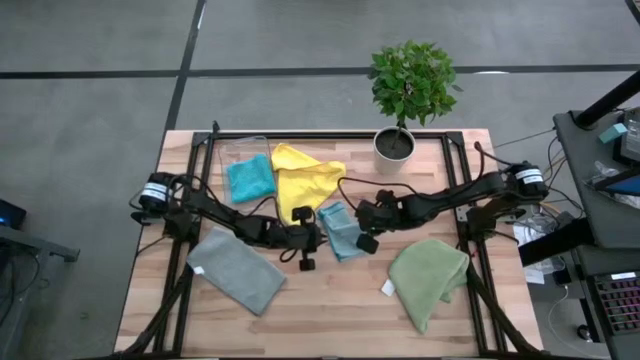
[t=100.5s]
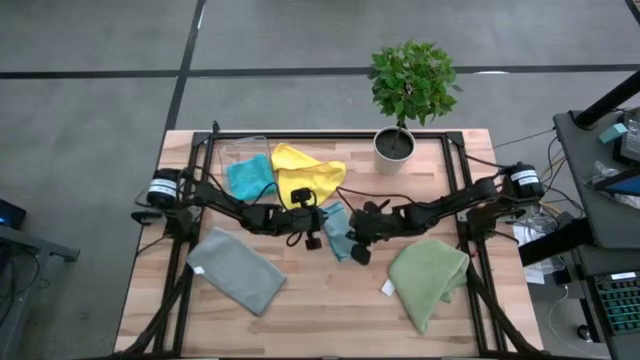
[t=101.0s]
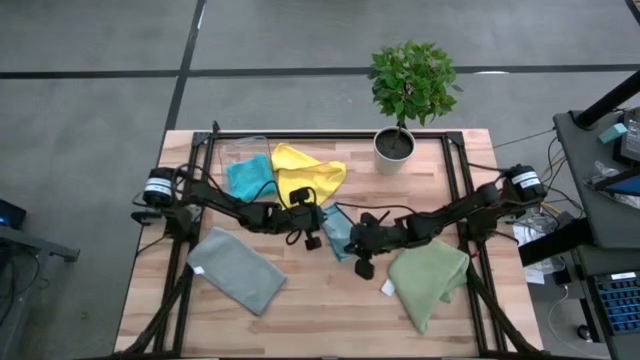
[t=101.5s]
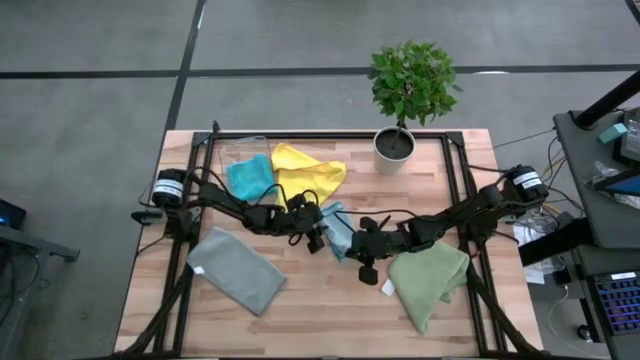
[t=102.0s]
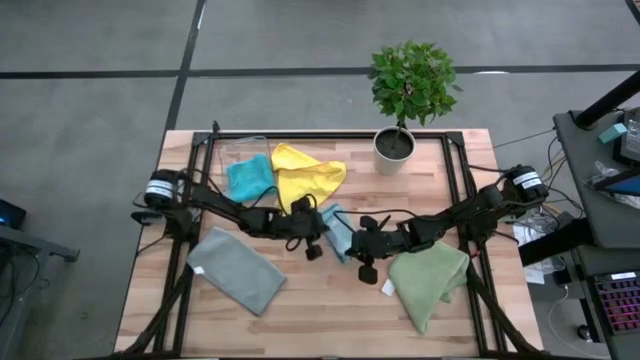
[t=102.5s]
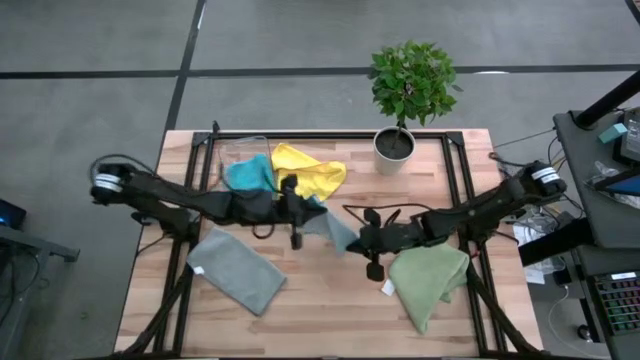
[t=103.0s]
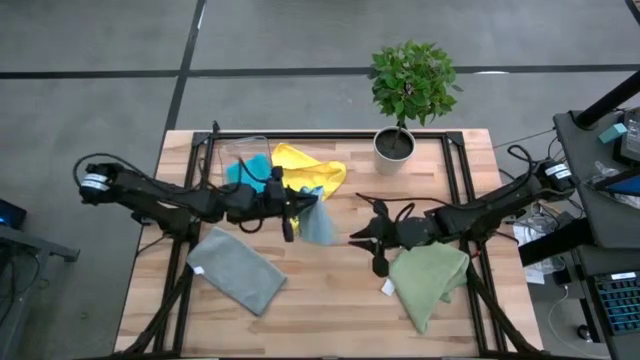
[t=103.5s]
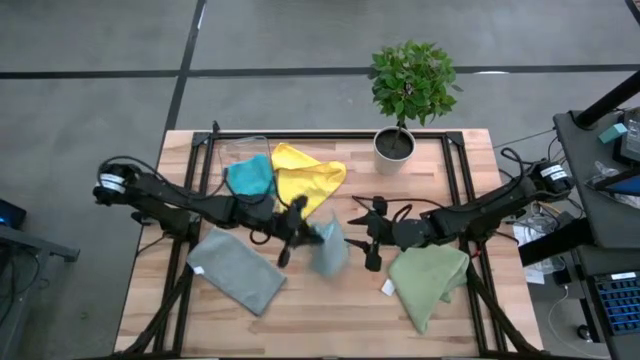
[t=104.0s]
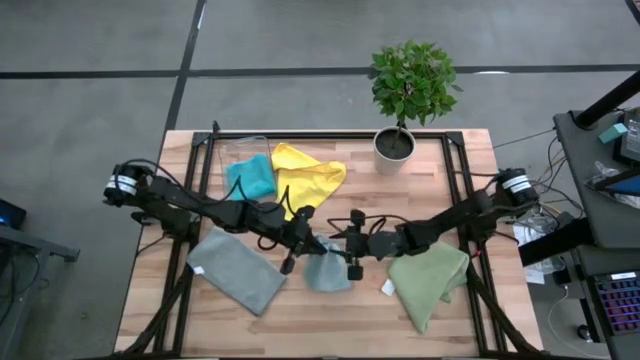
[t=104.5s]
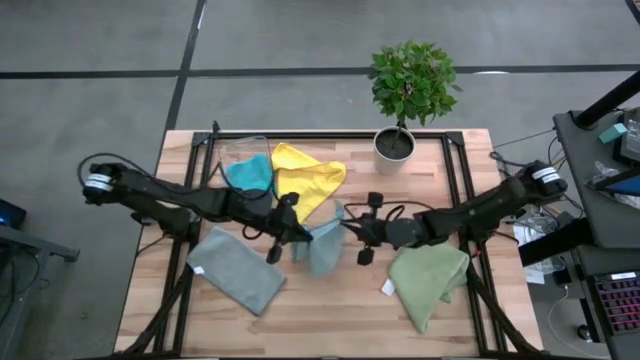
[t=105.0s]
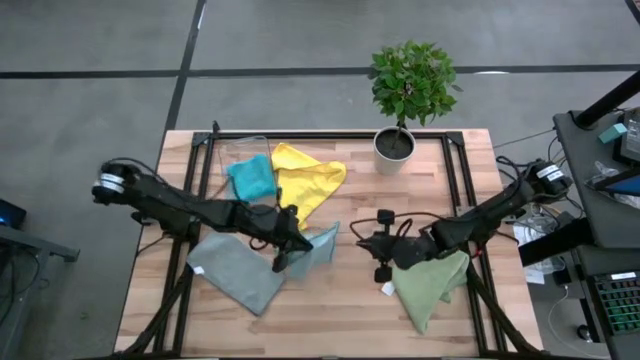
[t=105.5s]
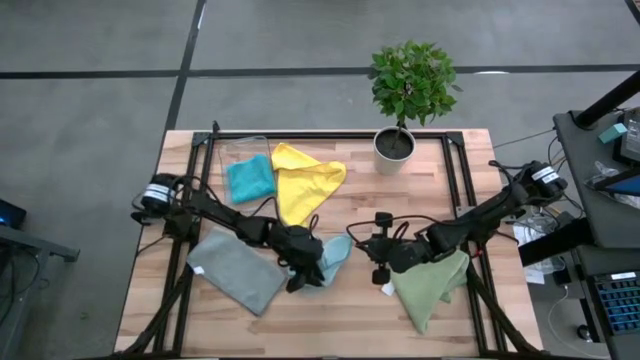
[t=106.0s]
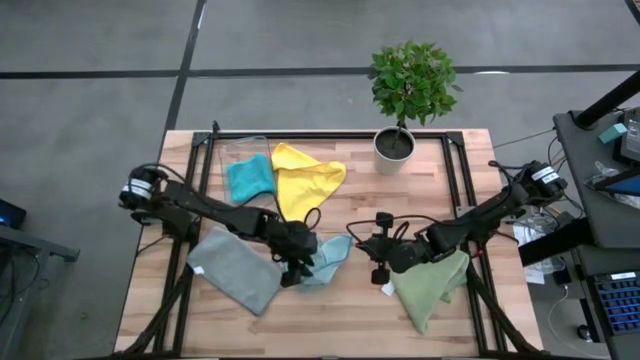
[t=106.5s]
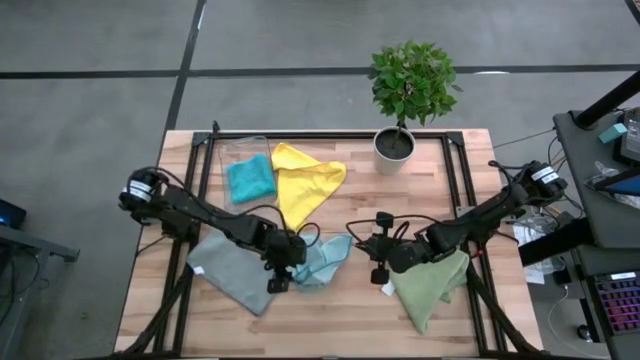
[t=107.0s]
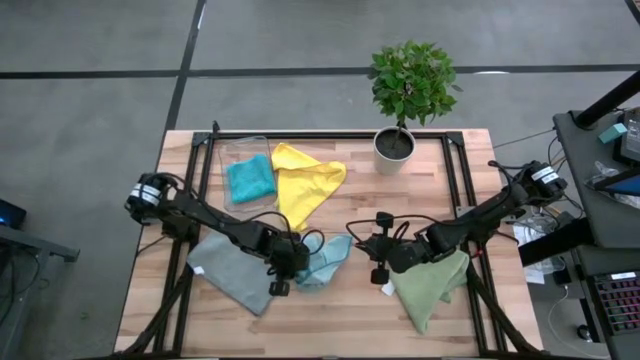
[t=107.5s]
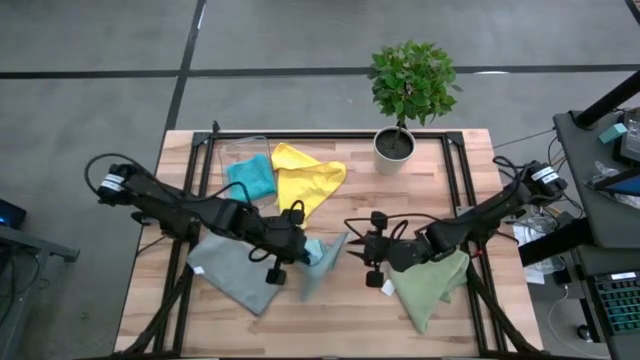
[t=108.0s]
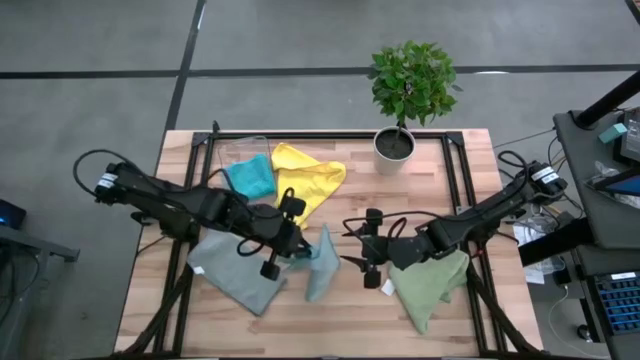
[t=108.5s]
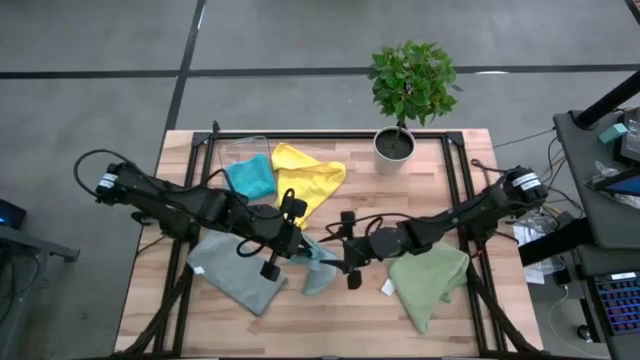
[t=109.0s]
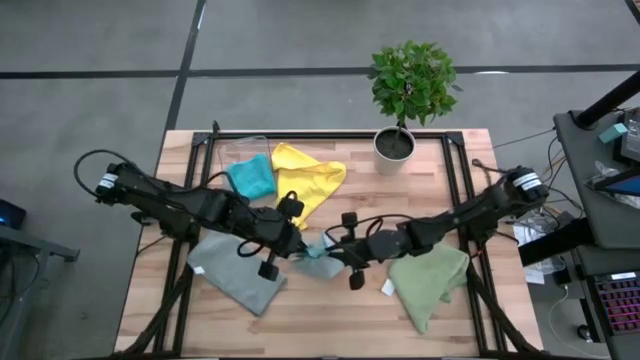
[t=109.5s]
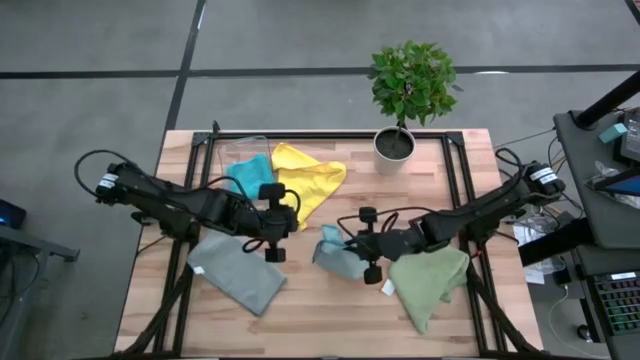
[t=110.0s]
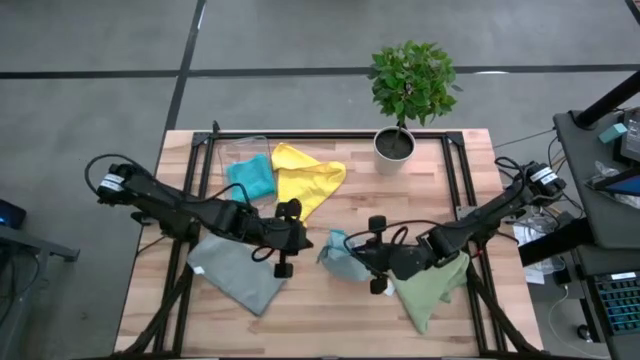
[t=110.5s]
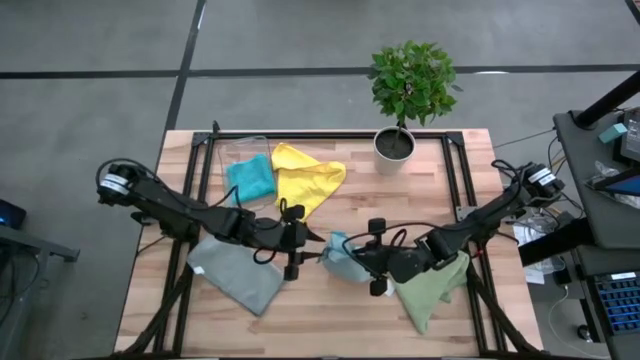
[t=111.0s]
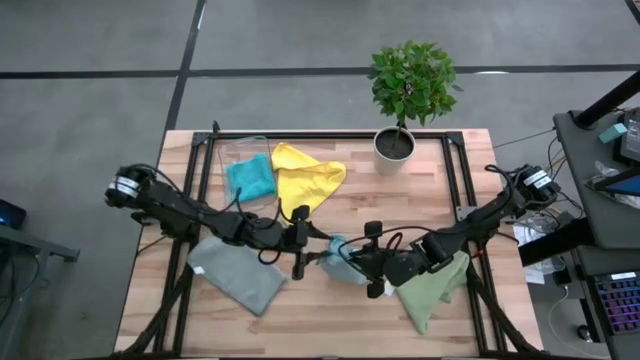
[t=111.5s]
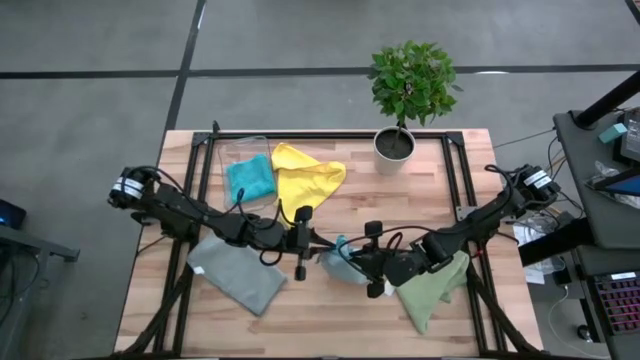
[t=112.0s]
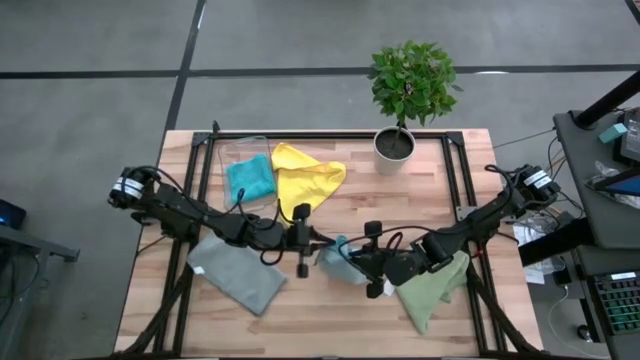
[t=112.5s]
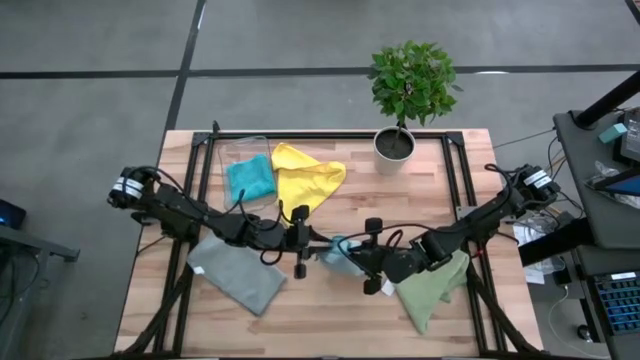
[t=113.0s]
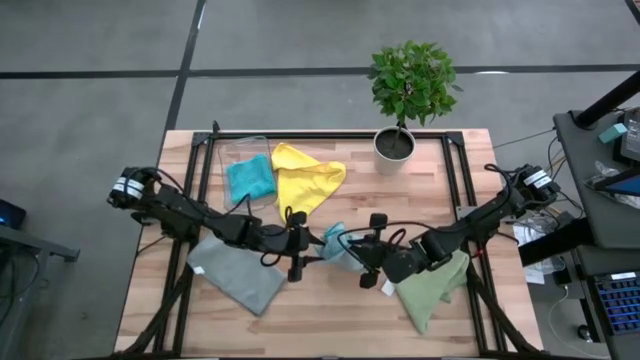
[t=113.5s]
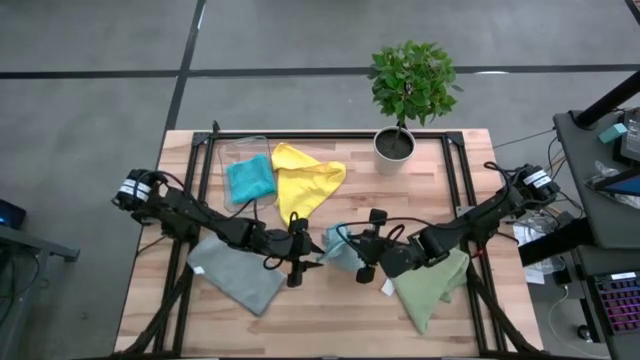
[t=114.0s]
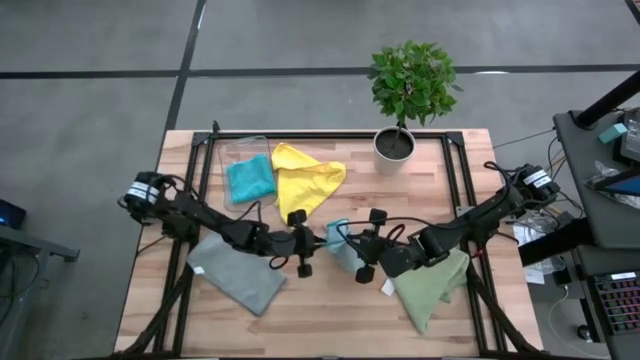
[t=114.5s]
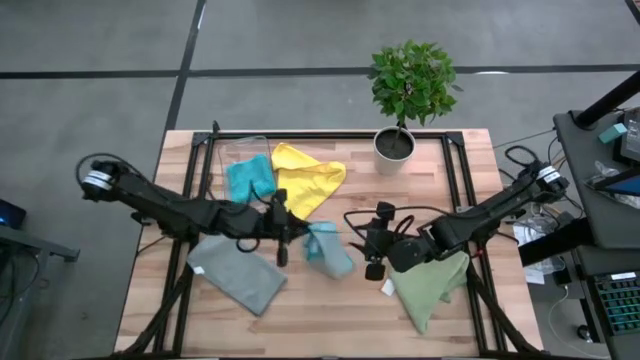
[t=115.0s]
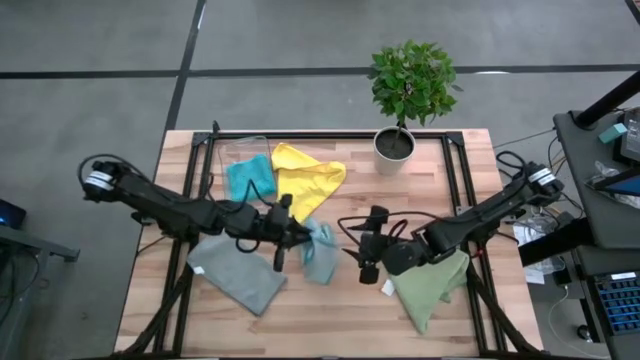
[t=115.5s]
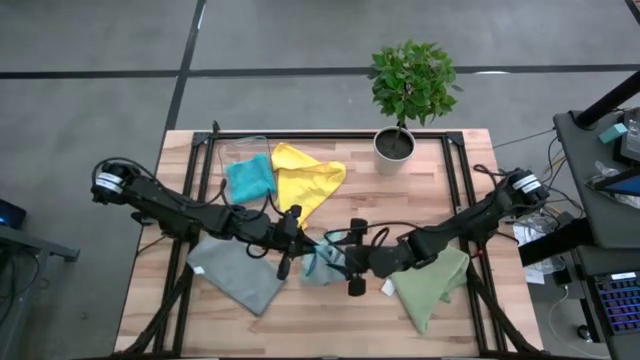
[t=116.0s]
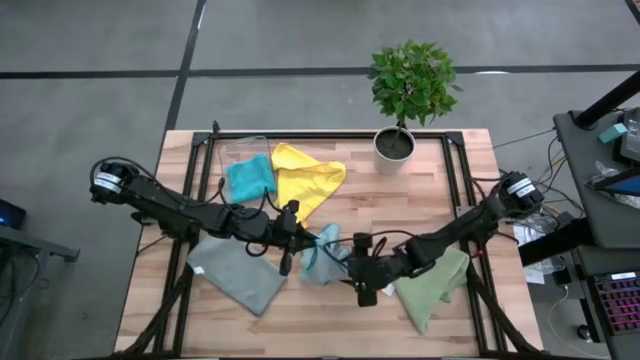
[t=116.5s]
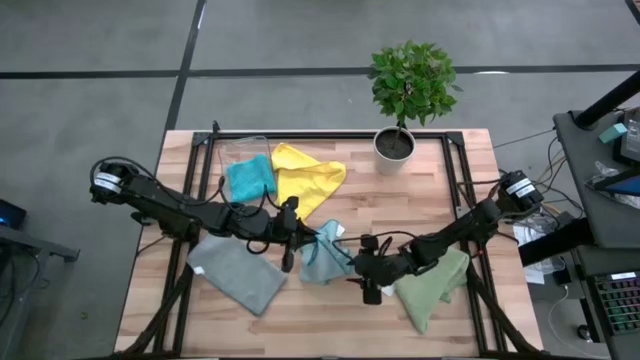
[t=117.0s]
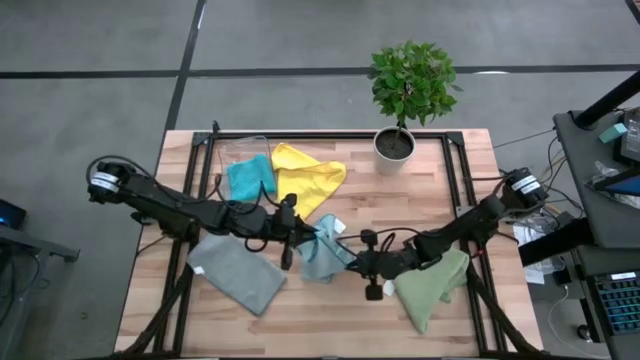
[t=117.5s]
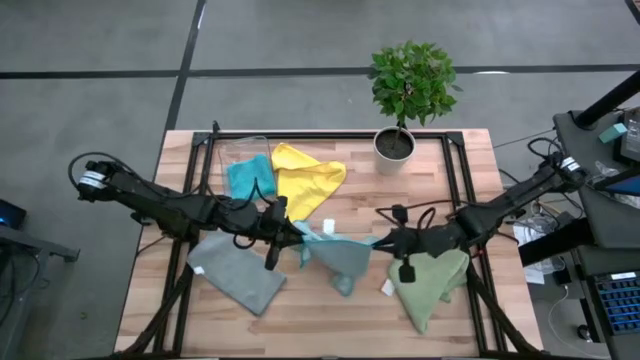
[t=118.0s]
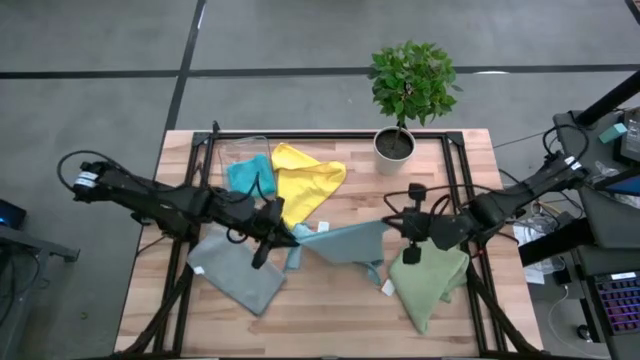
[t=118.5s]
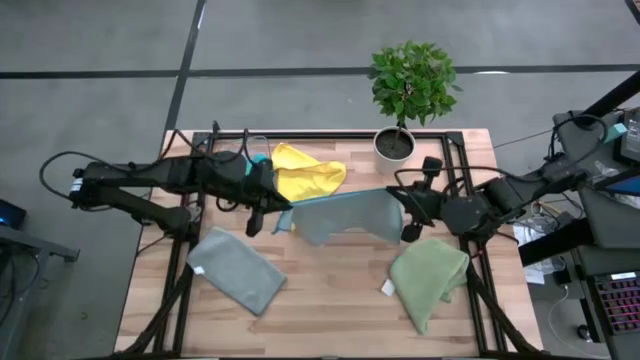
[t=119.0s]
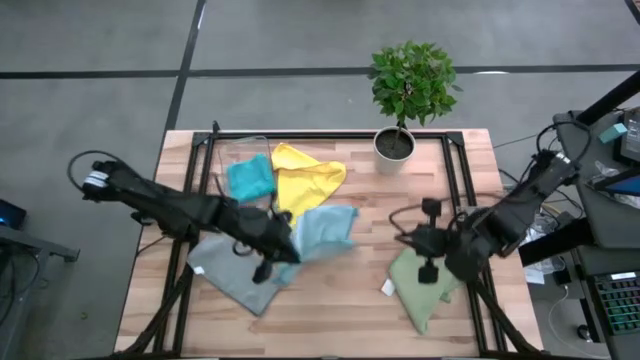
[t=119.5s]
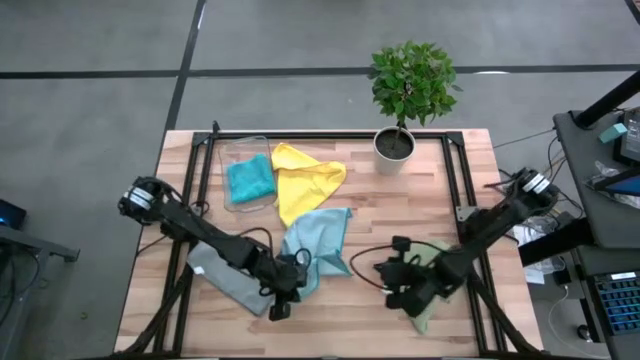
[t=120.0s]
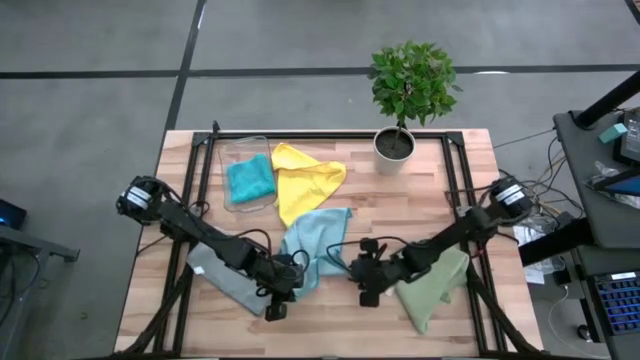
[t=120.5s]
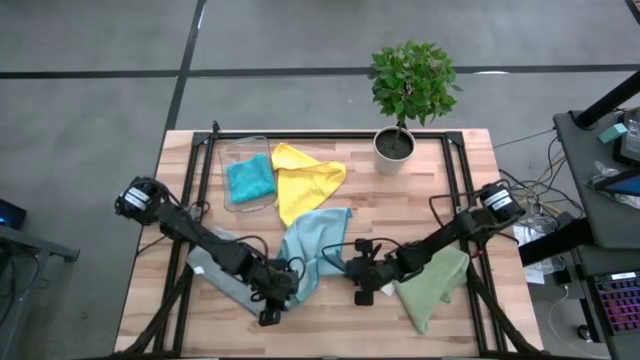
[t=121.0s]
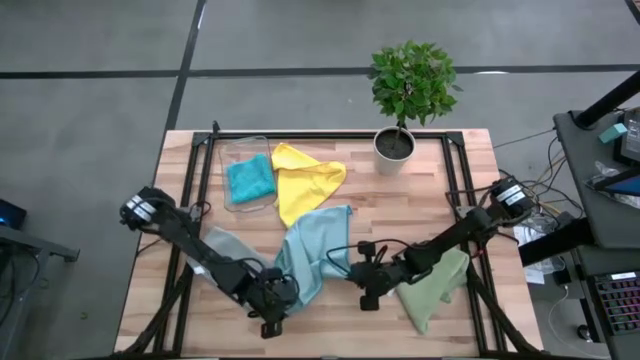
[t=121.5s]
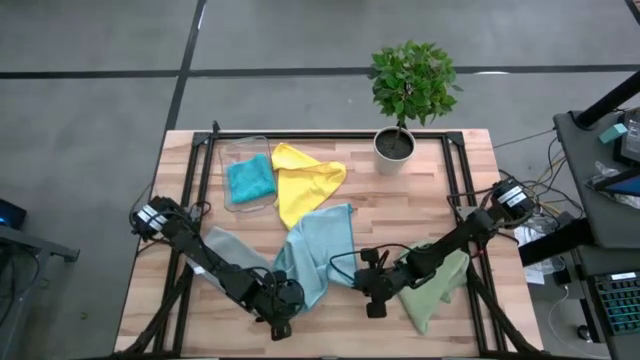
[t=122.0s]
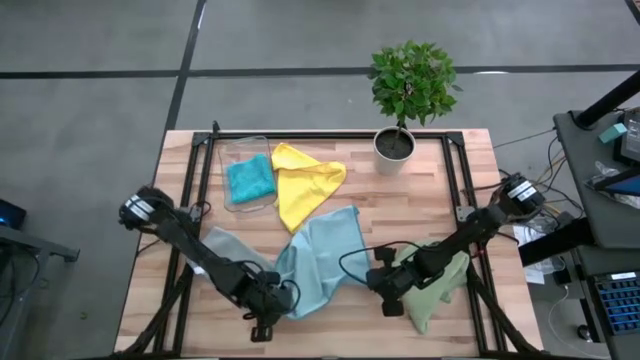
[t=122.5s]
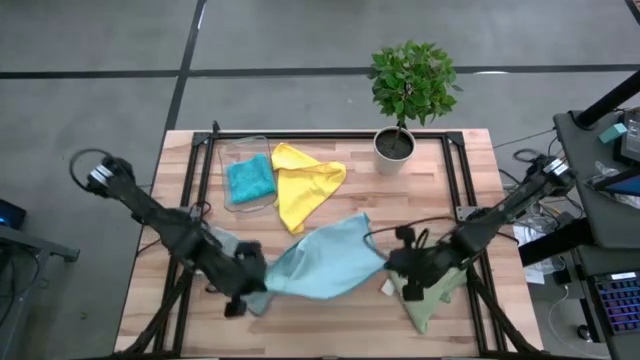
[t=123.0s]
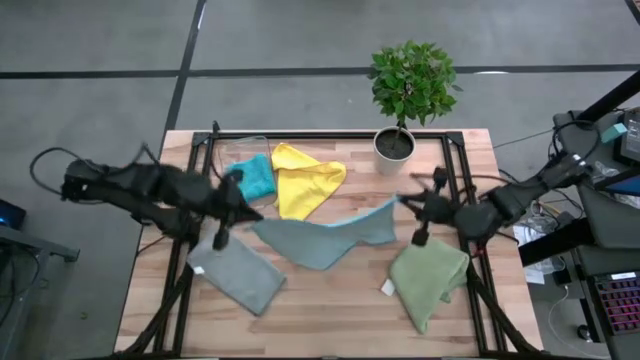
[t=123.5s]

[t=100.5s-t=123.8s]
Task: Fold microfiber towels
Fold the light blue microfiber towel
